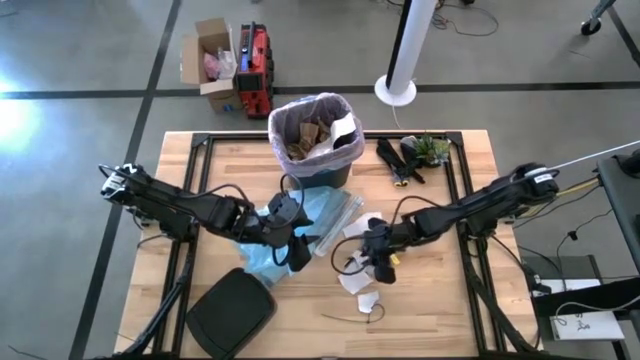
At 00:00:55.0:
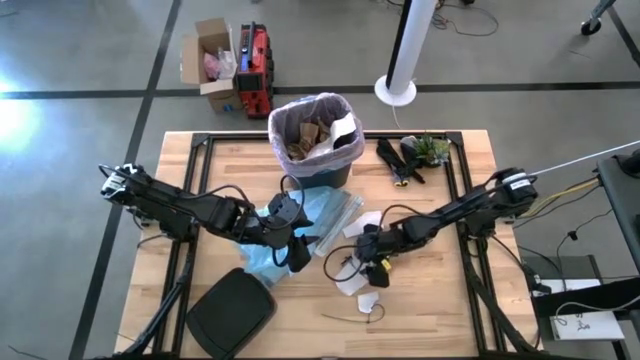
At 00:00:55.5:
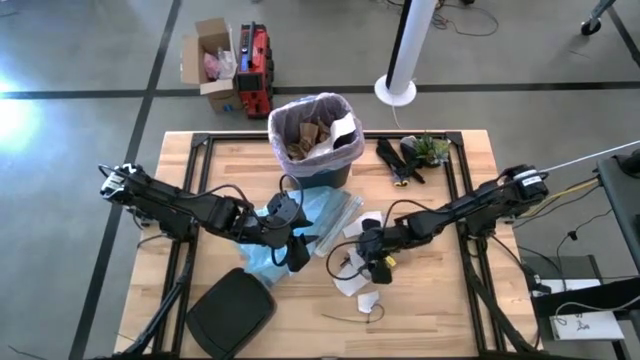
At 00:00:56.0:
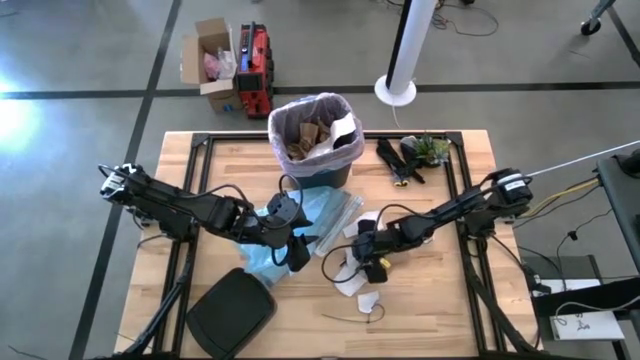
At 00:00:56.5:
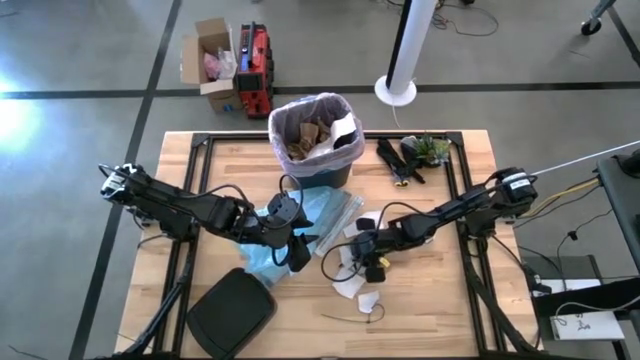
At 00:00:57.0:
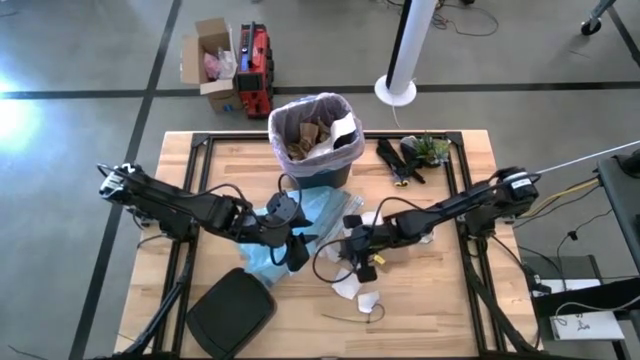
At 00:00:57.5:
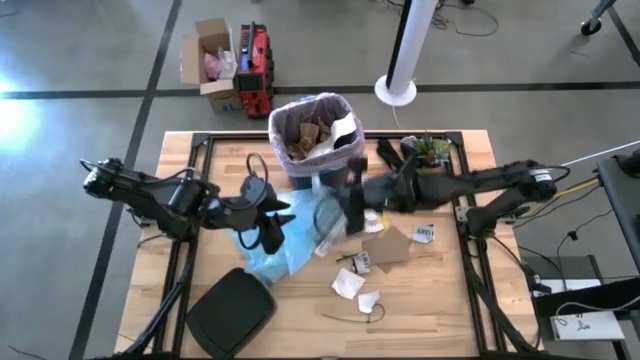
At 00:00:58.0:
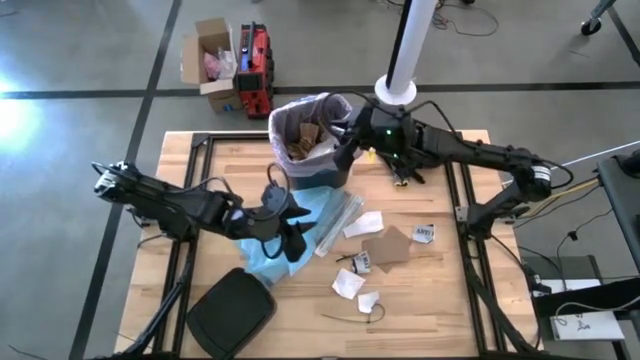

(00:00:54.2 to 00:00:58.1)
Task: place trash/remove bag and relplace
Put the white paper into the trash bin

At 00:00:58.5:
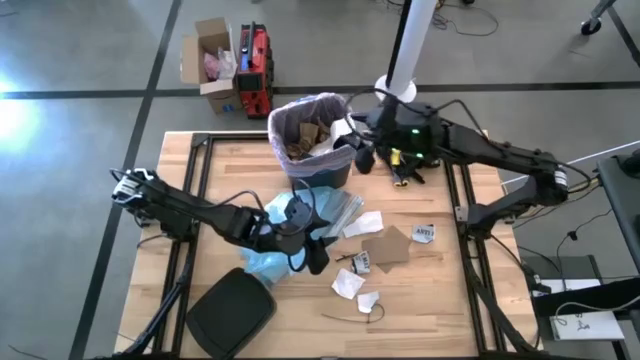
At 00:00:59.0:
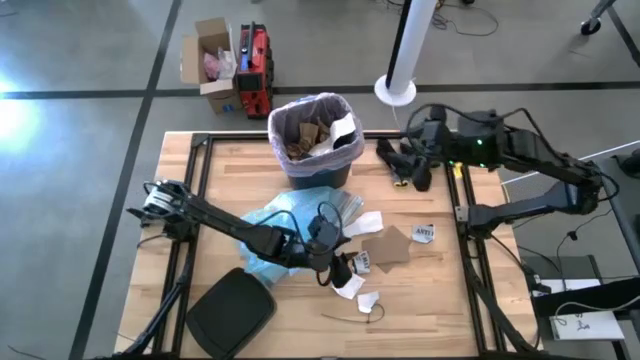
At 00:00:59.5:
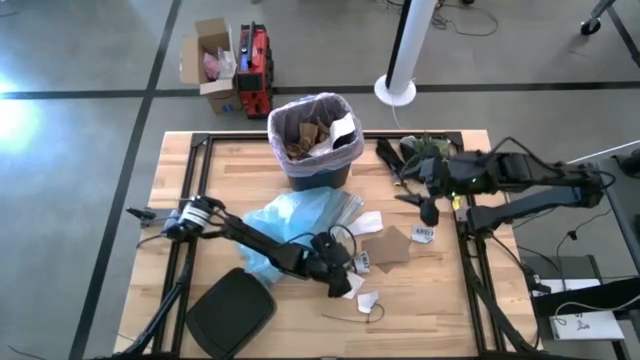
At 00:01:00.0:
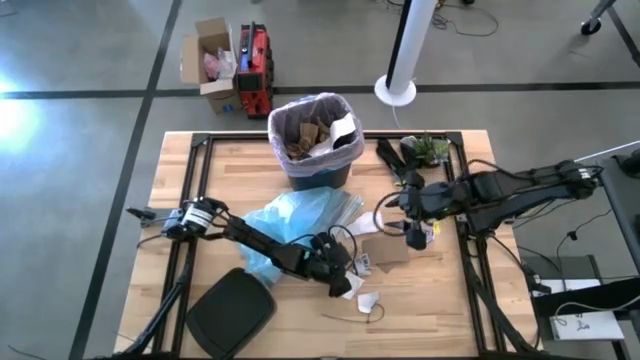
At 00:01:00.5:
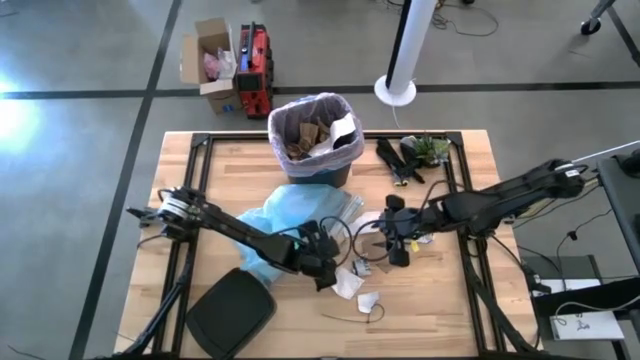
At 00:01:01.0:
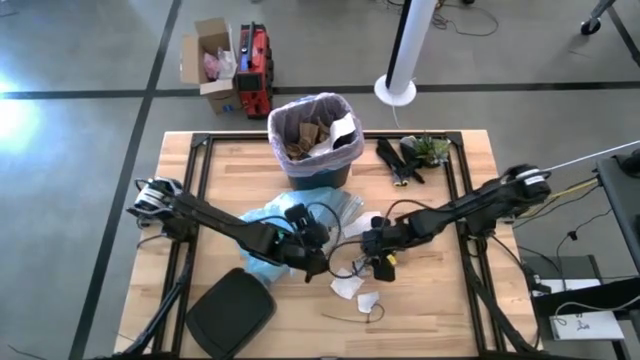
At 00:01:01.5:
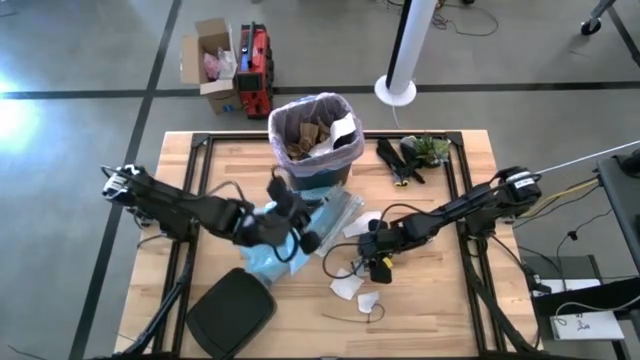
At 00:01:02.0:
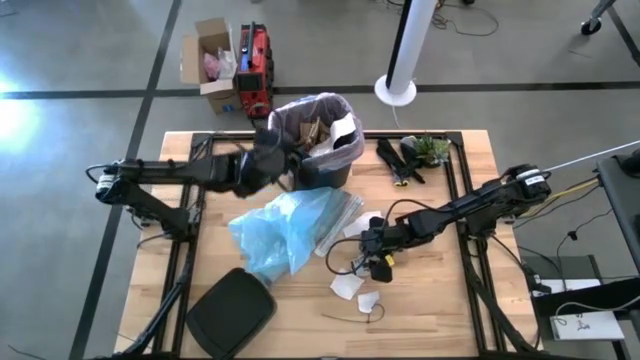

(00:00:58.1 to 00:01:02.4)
Put the zip-tied color cables into the trash bin

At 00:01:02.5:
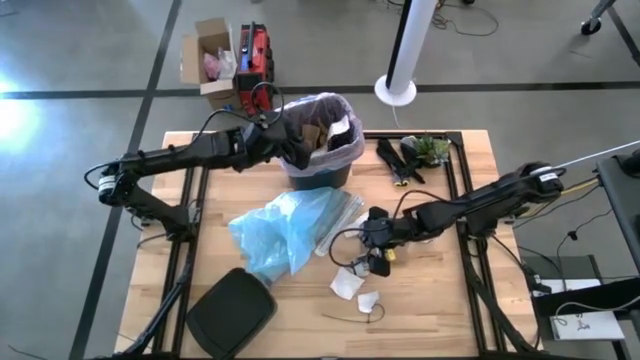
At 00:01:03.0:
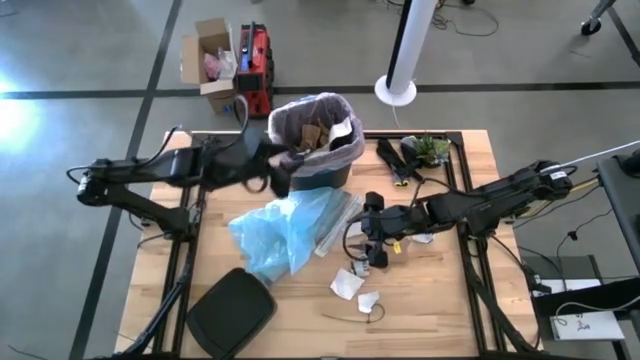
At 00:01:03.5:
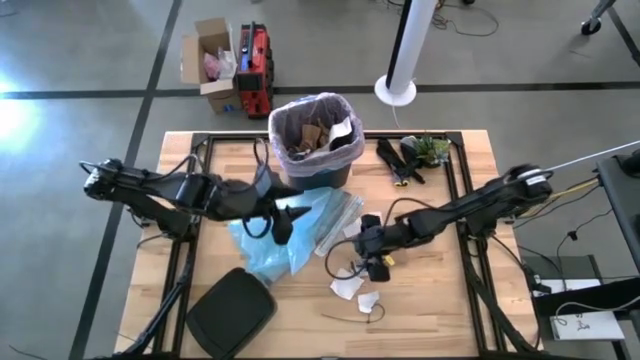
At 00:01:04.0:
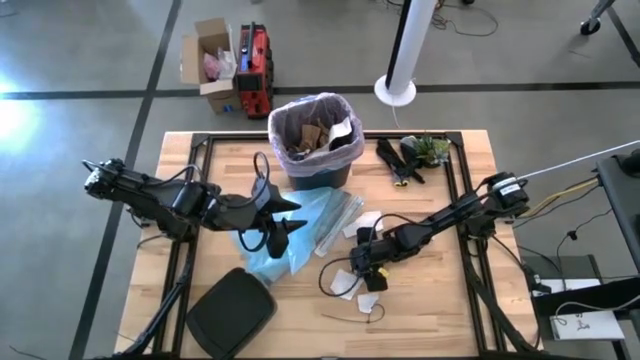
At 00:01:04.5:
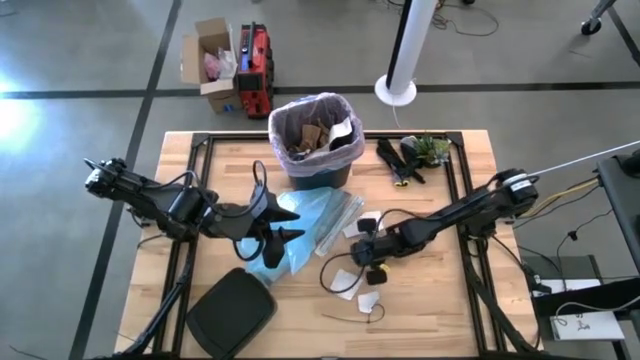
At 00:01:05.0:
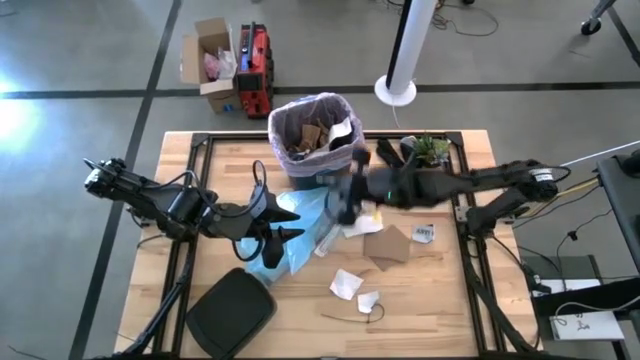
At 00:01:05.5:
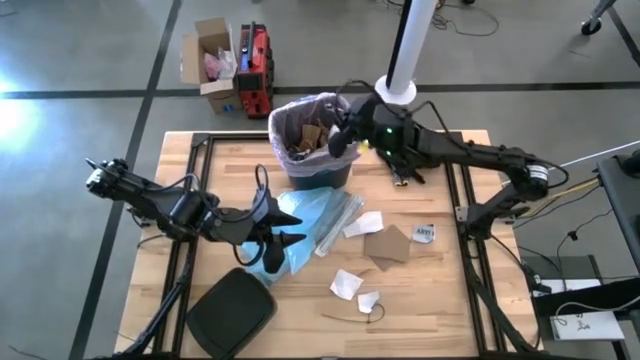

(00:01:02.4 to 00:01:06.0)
Put the white paper into the trash bin

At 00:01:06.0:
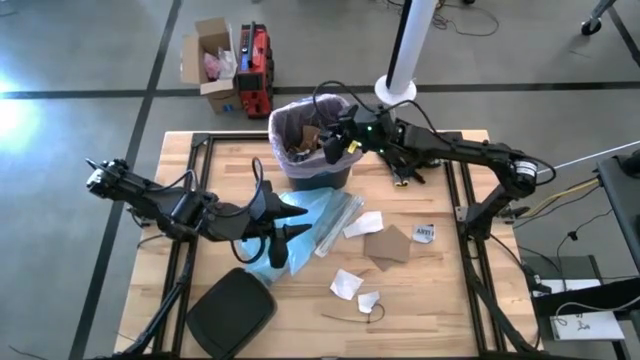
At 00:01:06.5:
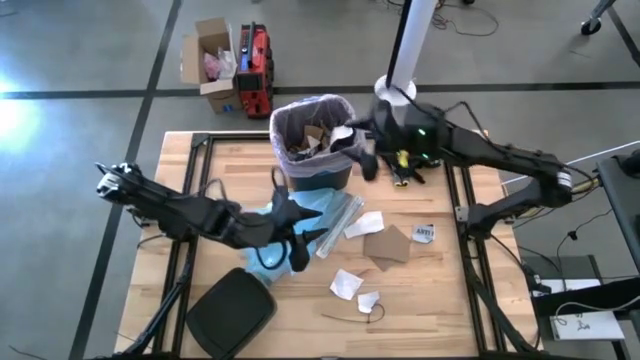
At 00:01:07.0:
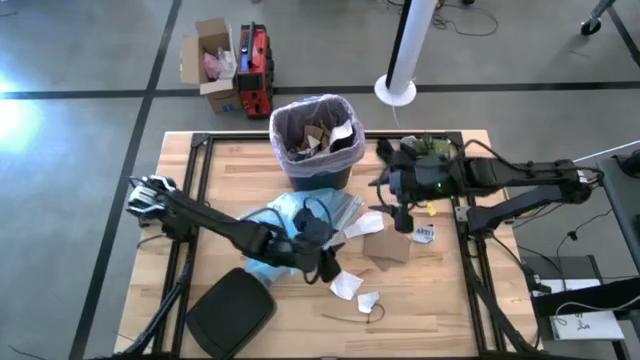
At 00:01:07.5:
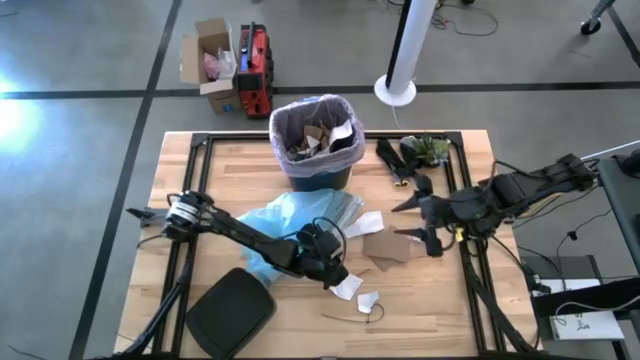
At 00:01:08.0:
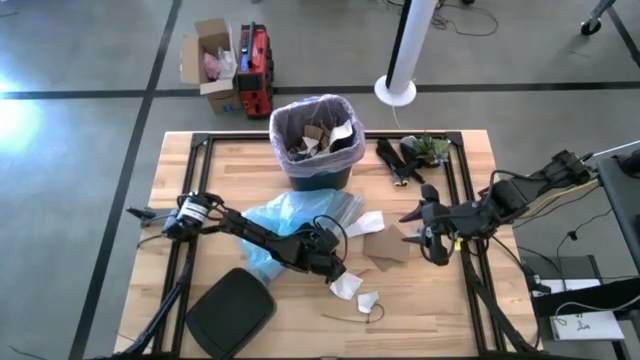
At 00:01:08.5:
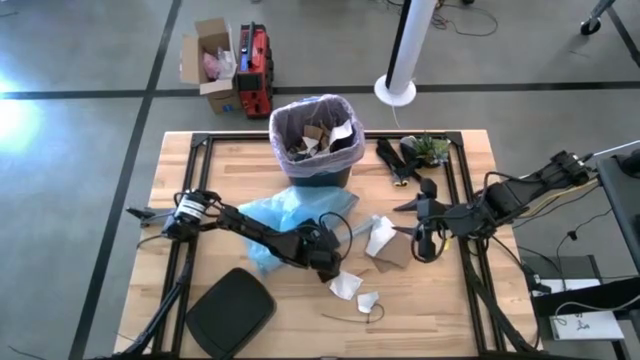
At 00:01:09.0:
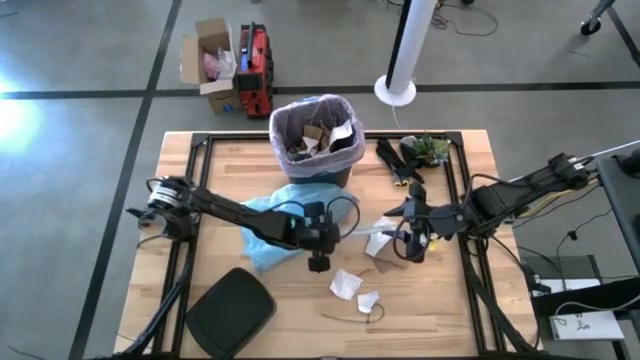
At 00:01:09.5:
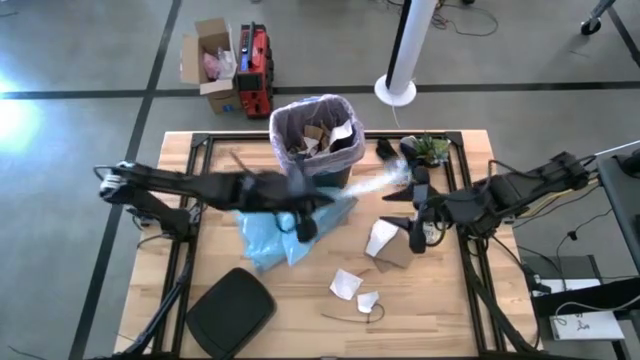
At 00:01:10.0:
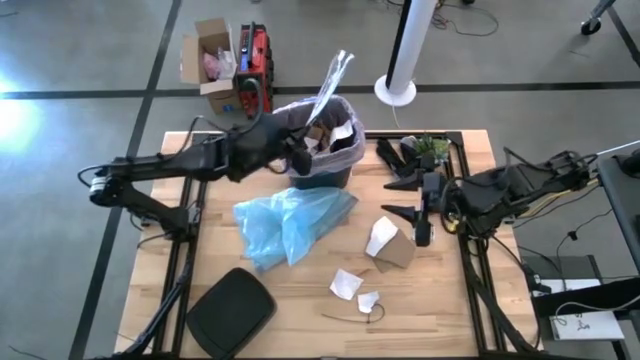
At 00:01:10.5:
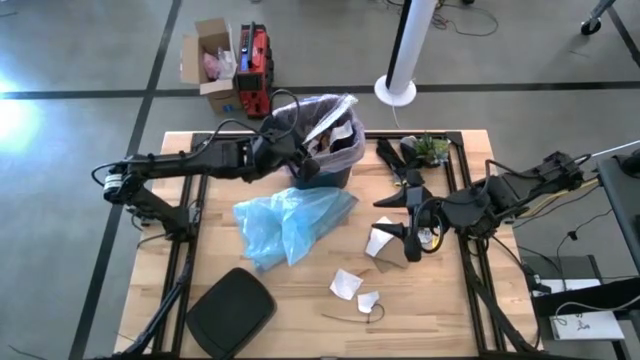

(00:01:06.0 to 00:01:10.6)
Put the transparent plastic into the trash bin

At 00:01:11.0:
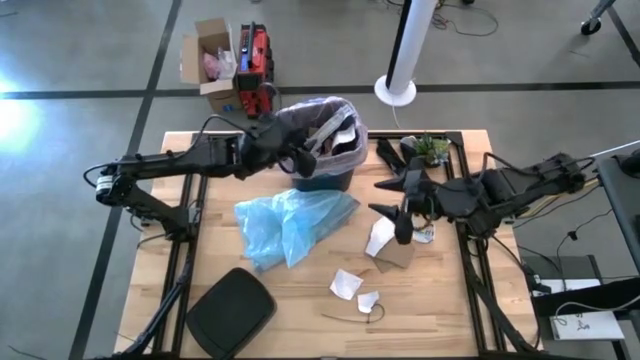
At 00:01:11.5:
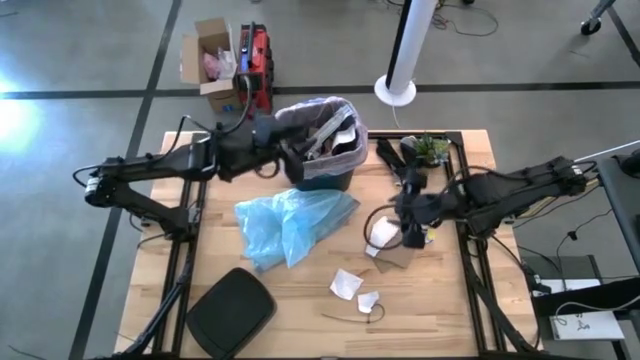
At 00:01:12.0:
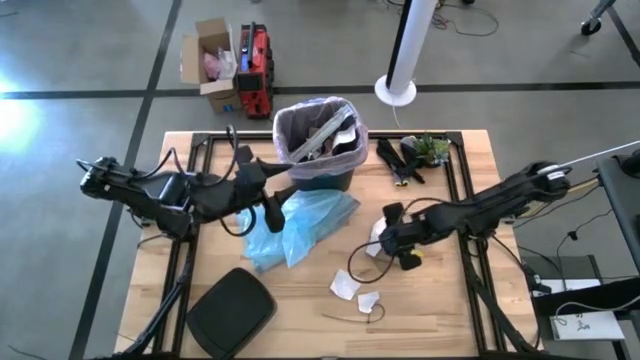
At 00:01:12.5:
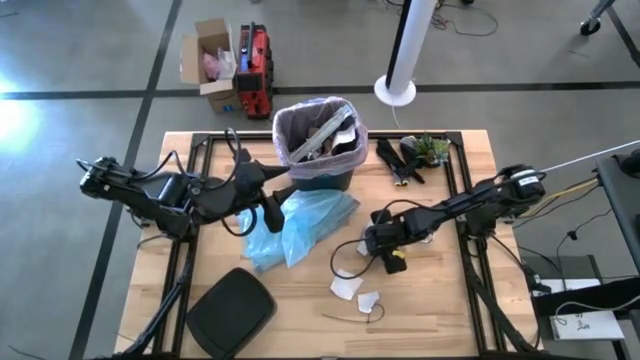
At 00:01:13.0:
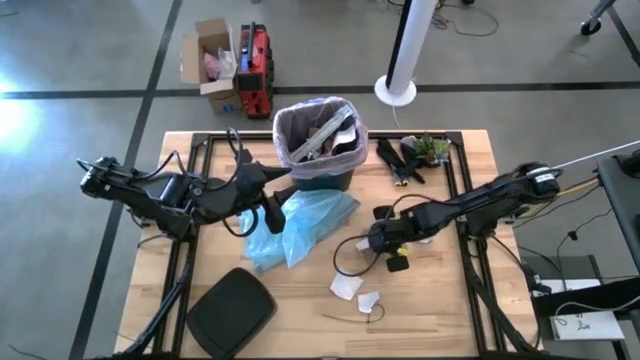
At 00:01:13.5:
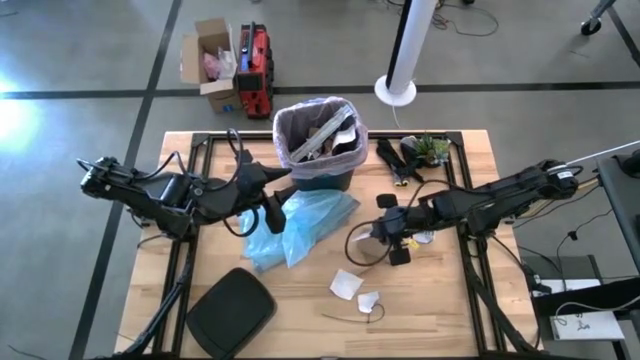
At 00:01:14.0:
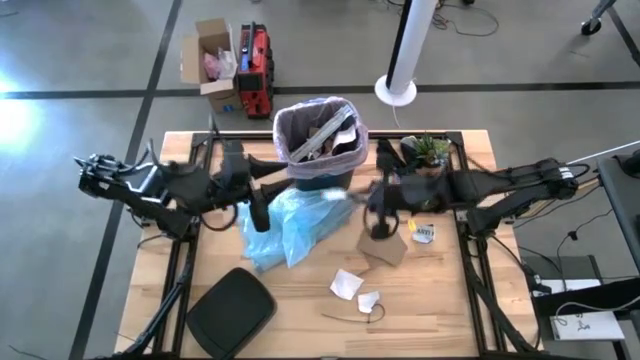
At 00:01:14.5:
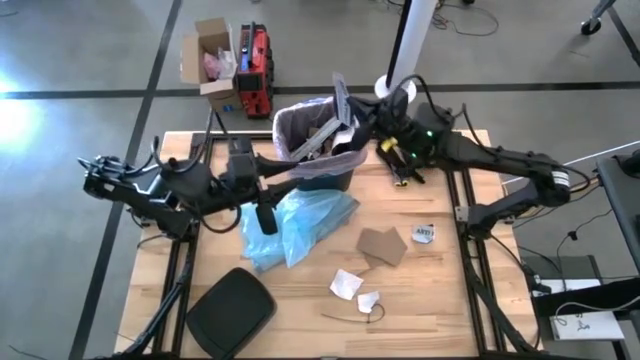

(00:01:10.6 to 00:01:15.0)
Put the white paper into the trash bin
